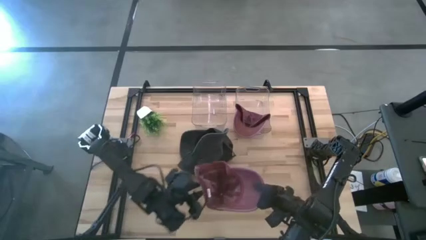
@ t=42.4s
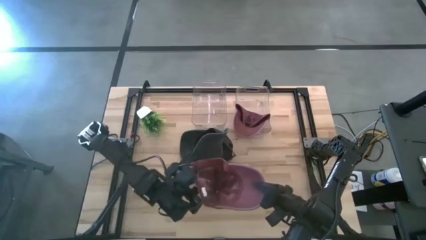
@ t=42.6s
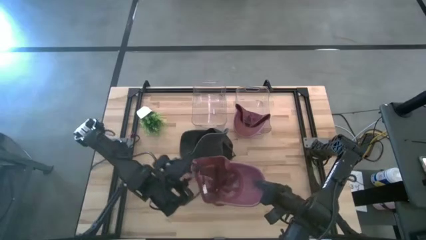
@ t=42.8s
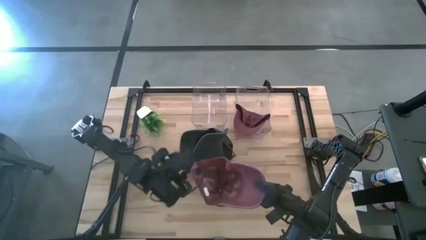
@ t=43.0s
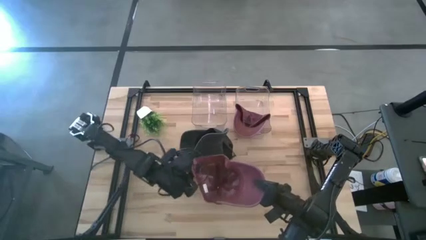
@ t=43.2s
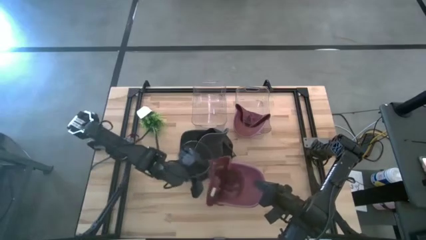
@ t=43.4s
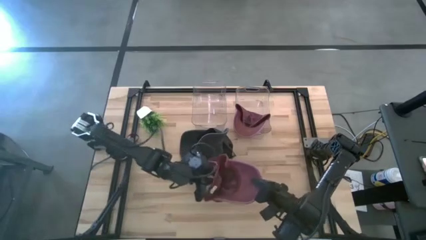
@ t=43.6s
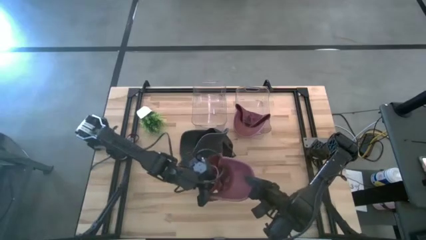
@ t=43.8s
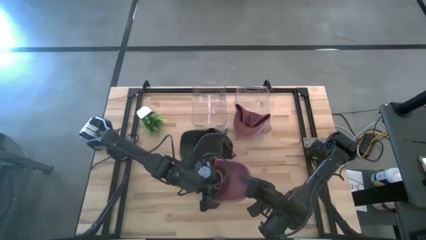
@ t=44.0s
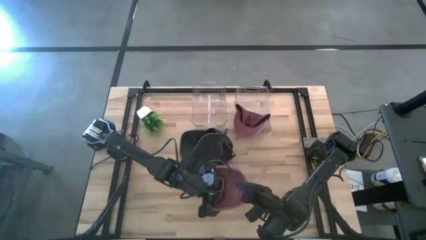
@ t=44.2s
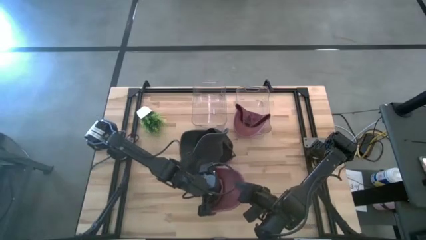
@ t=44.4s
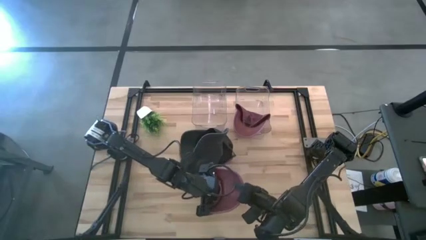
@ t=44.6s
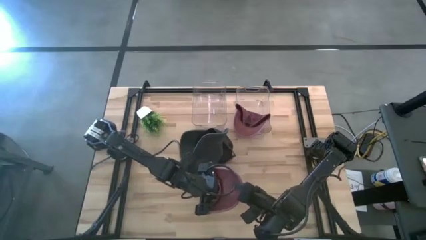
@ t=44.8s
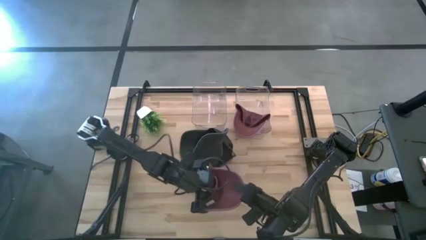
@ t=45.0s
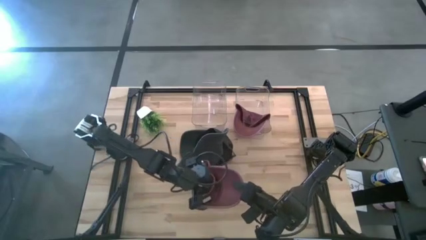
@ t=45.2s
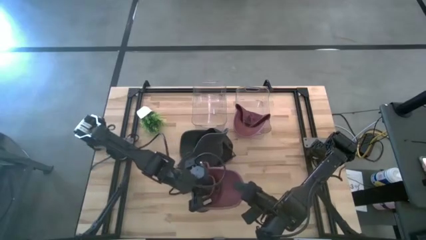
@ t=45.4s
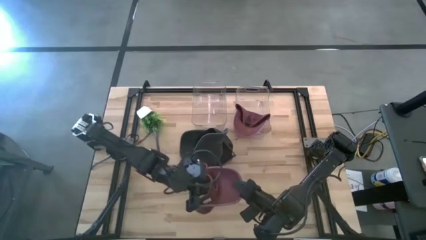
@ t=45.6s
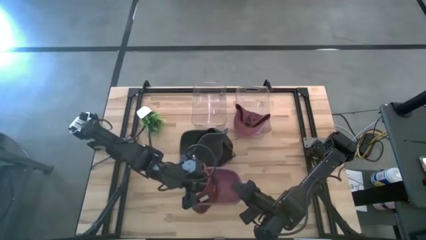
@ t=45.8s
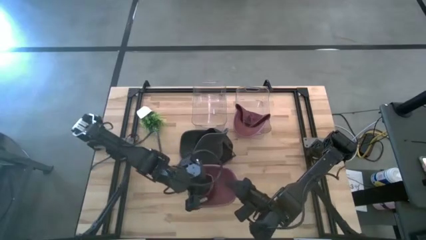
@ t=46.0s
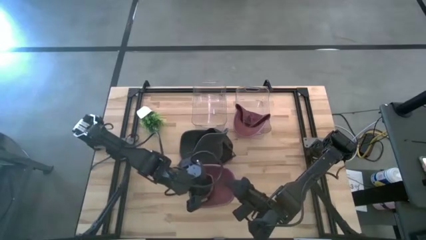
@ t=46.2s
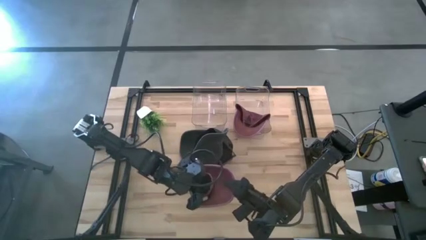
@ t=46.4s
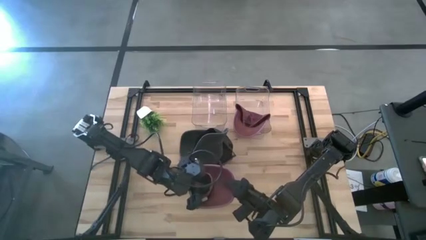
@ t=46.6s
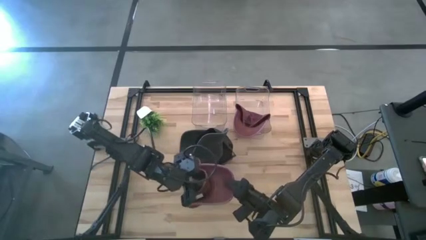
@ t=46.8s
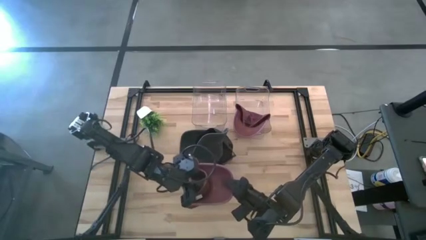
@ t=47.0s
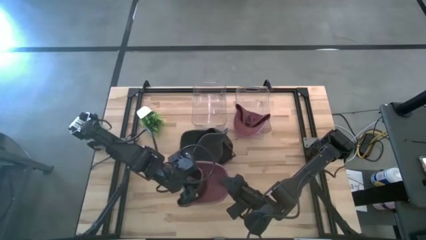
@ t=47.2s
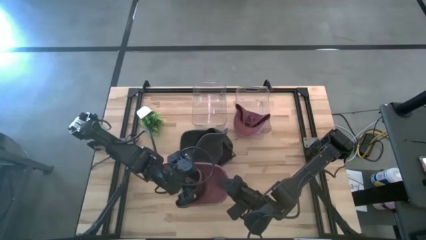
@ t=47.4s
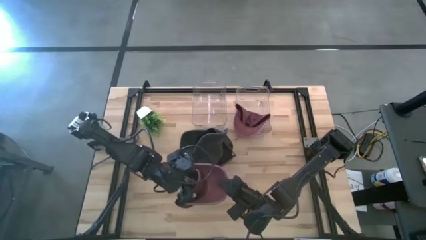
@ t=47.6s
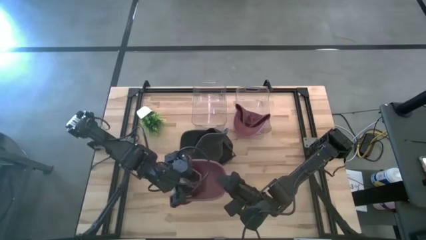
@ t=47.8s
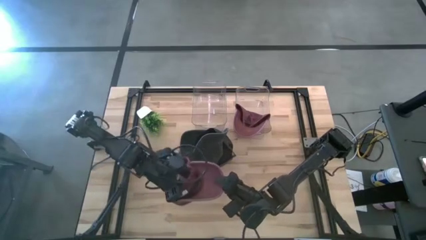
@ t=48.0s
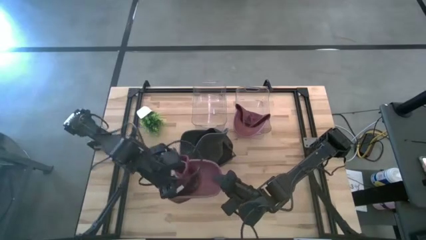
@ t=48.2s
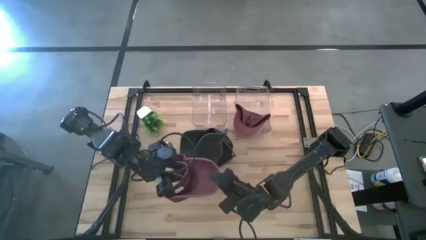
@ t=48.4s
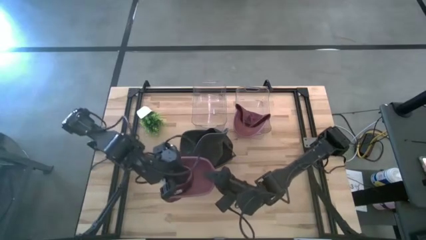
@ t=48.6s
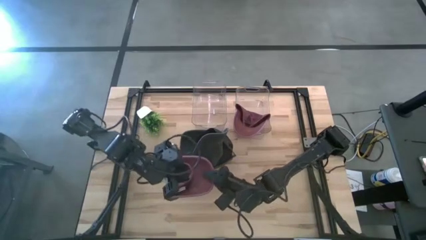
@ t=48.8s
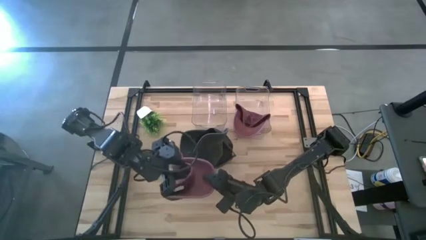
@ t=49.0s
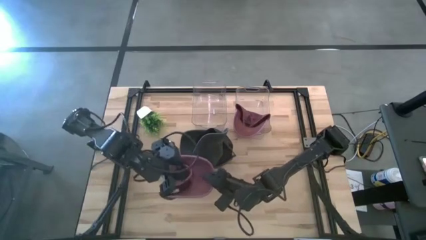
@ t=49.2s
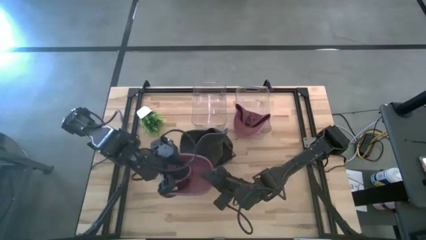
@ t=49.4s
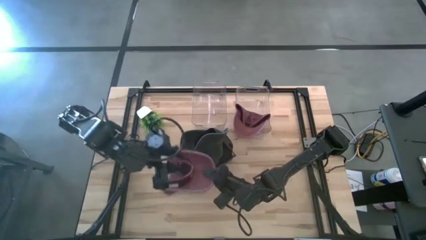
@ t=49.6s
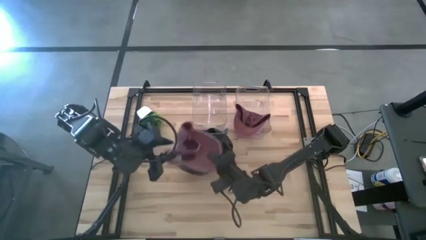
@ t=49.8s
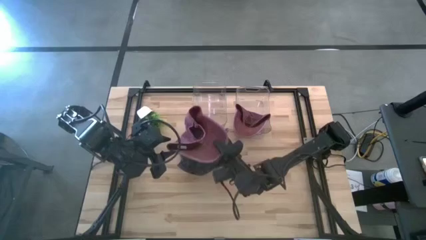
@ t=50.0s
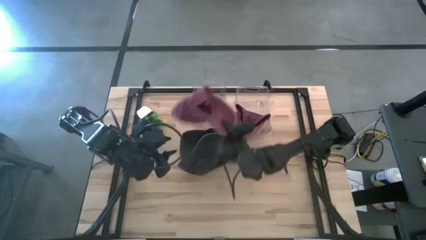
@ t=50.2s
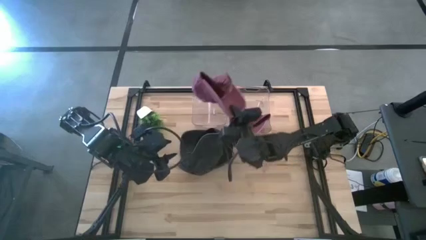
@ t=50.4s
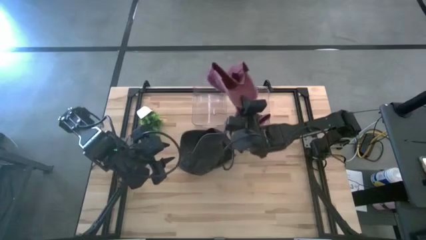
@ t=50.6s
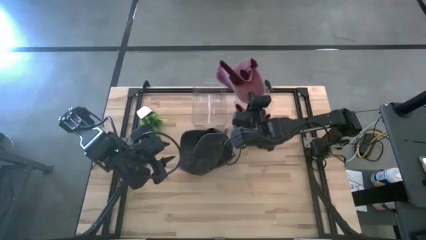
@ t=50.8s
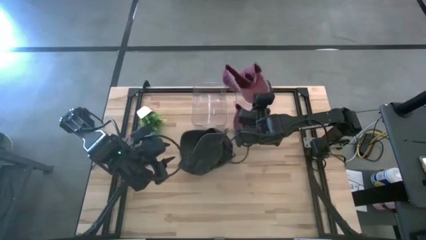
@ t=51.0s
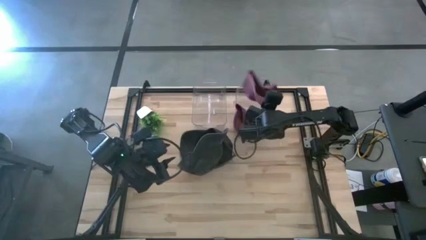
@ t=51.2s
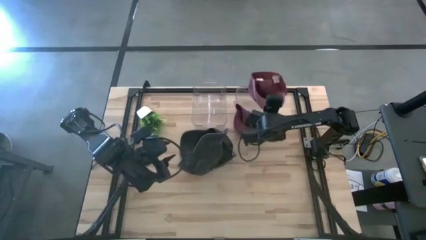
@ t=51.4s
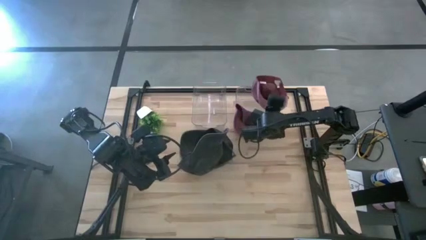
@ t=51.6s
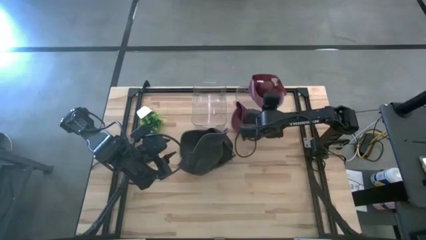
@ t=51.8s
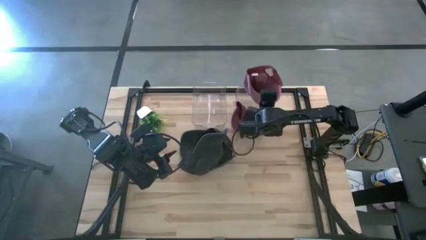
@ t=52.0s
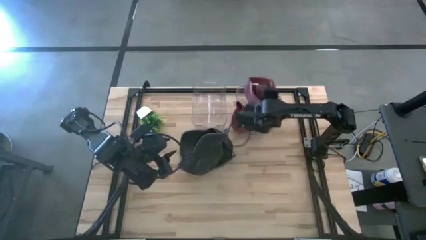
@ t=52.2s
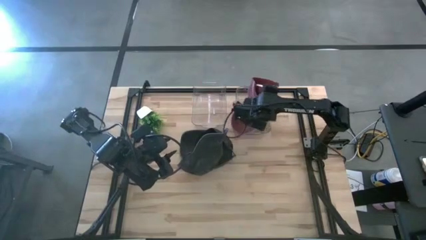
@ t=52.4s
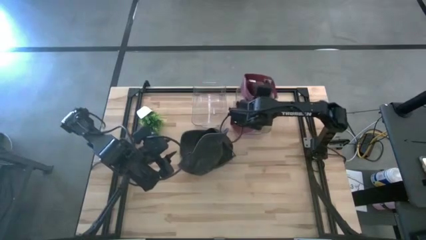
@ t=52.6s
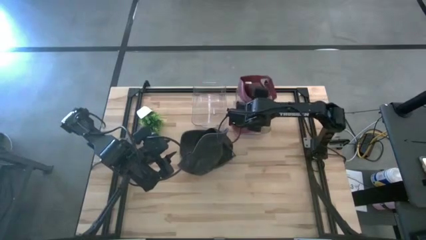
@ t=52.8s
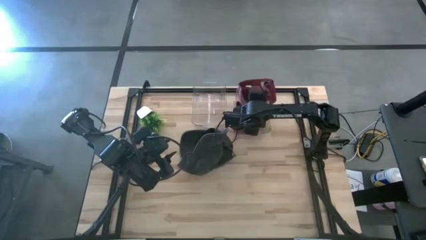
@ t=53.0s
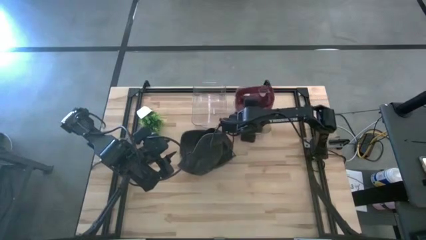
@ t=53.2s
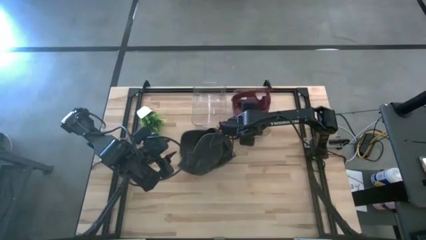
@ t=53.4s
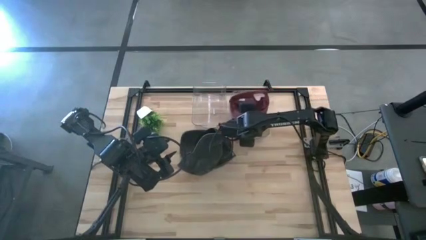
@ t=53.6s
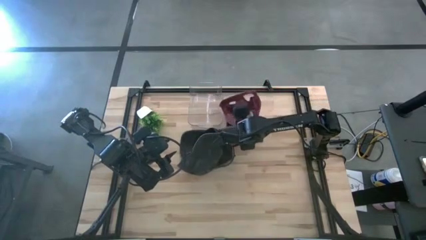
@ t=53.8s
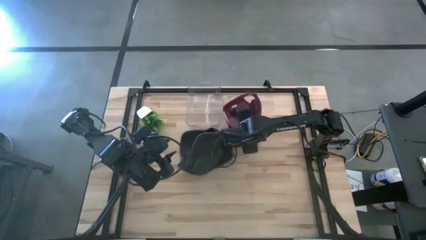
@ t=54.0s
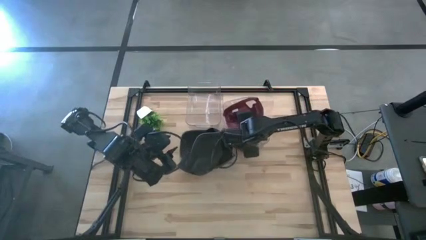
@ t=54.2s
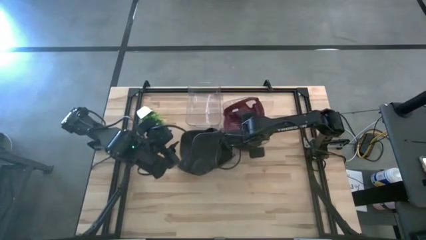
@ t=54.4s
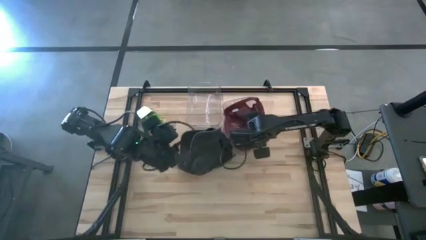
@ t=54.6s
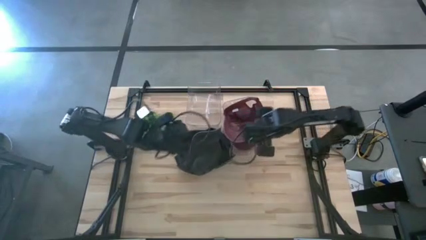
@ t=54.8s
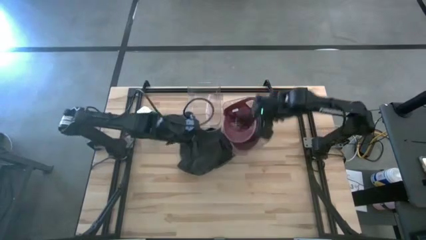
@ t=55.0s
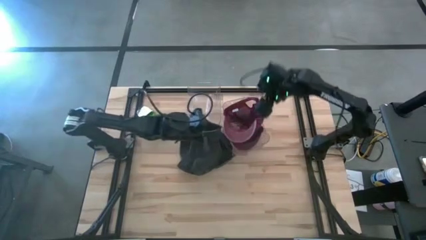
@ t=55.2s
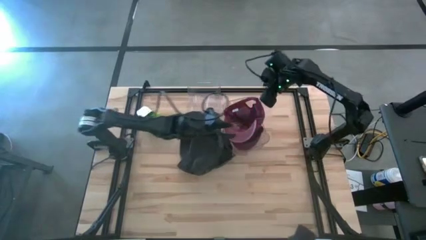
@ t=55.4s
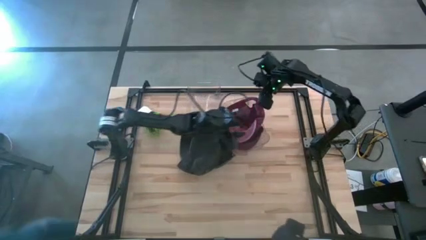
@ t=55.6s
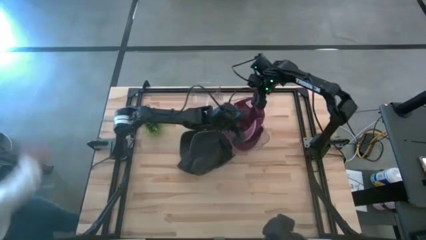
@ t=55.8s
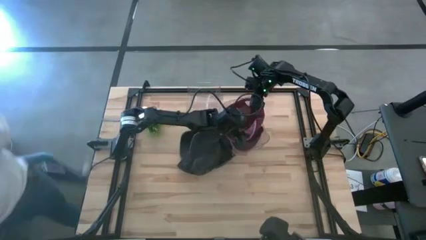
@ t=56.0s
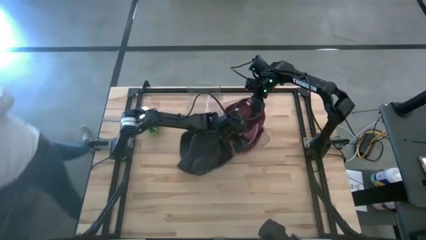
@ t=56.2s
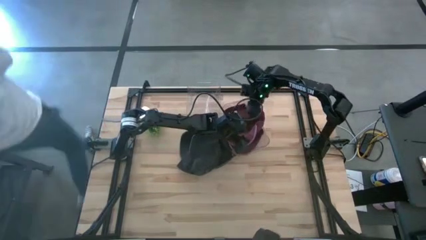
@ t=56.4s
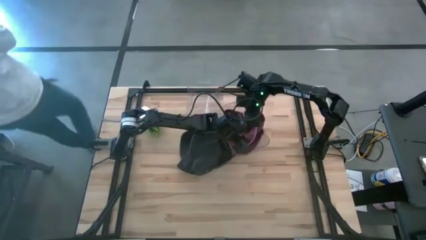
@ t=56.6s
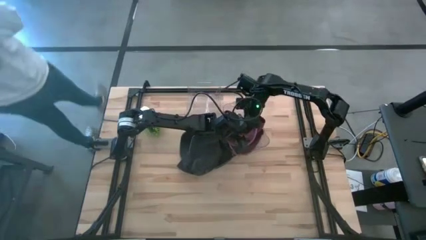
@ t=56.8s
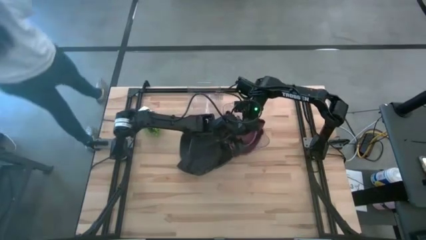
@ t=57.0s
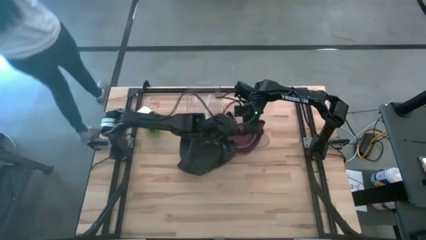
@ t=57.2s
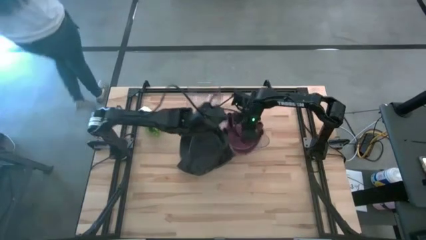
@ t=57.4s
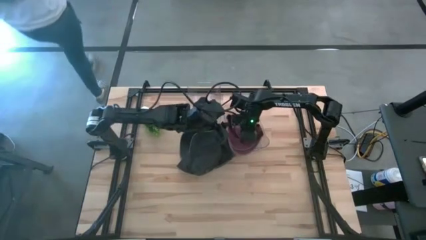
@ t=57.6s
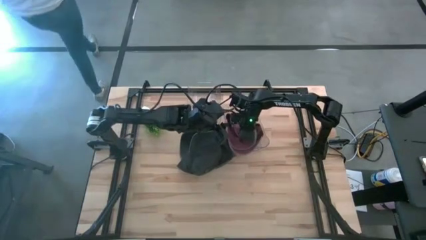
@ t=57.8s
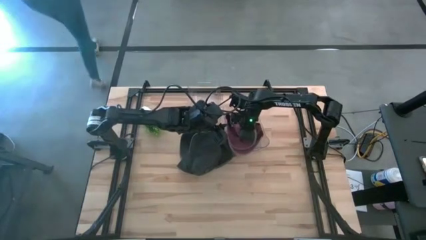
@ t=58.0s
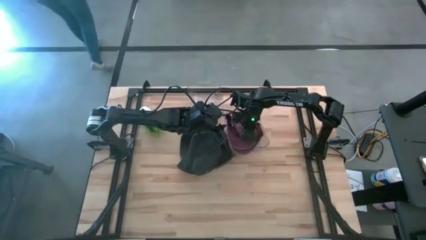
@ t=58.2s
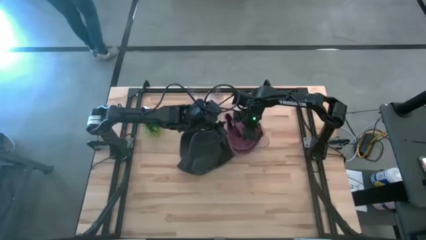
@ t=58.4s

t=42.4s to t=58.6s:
Task: Pick & Place hat
Put the red cap into the right transparent bin
